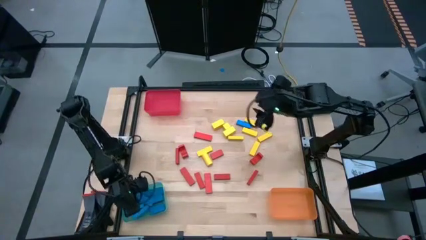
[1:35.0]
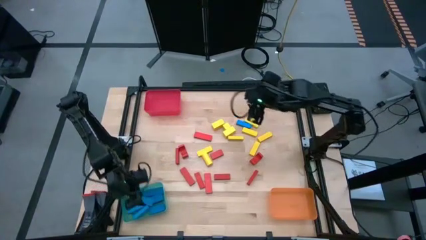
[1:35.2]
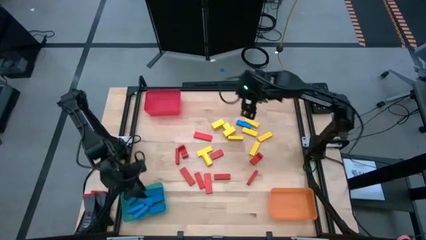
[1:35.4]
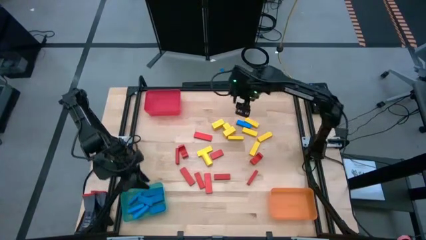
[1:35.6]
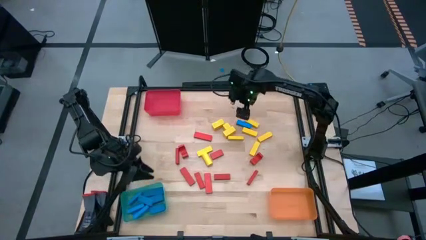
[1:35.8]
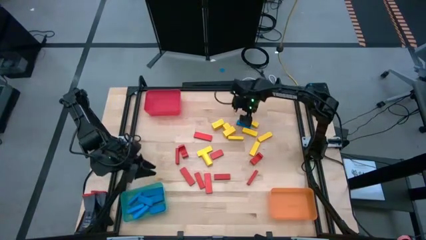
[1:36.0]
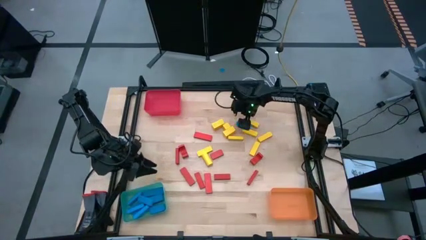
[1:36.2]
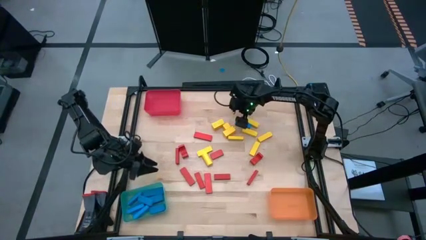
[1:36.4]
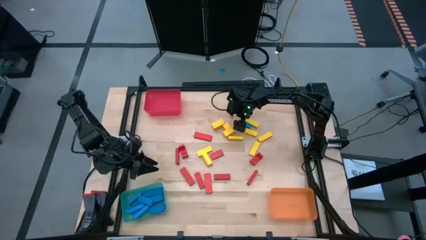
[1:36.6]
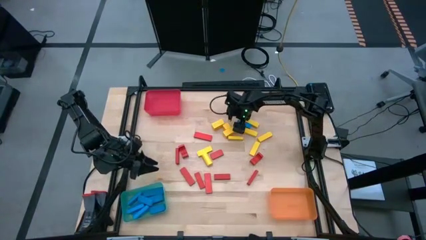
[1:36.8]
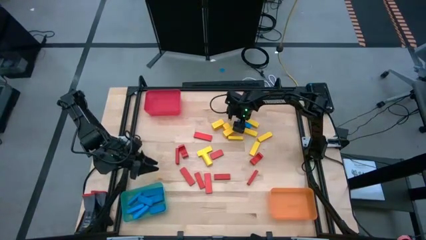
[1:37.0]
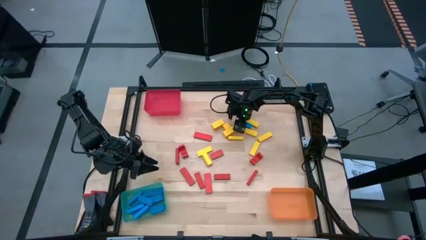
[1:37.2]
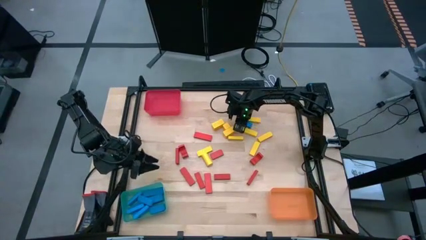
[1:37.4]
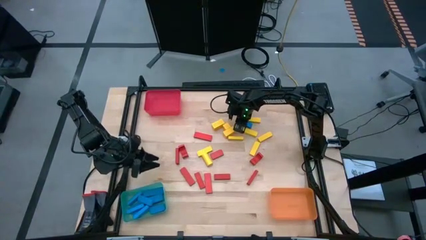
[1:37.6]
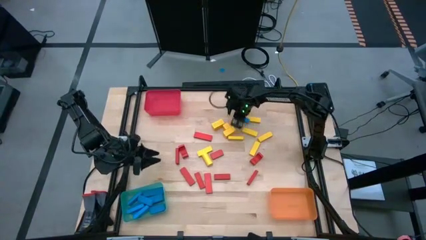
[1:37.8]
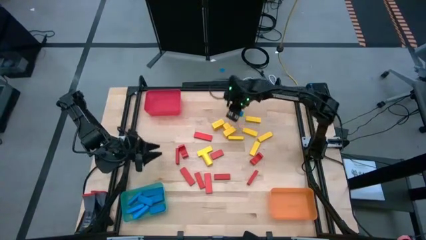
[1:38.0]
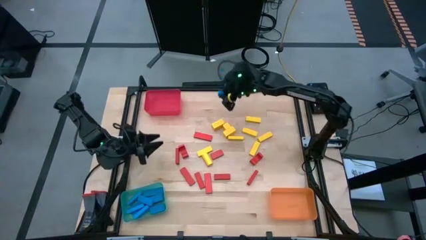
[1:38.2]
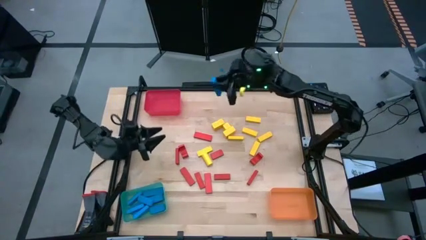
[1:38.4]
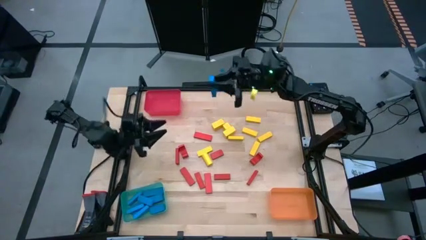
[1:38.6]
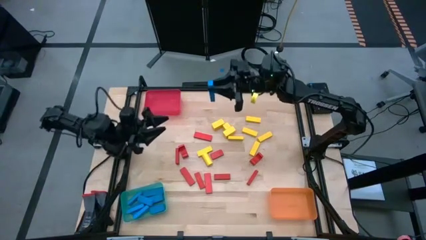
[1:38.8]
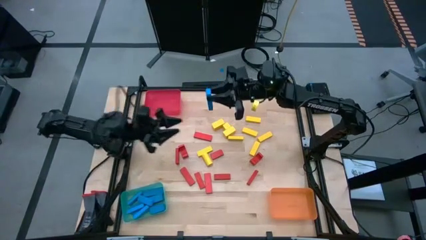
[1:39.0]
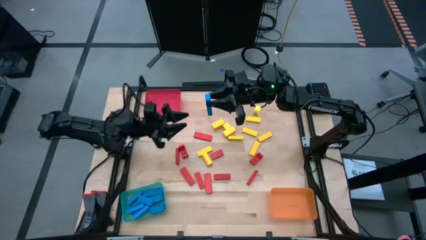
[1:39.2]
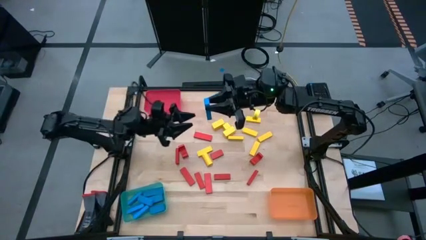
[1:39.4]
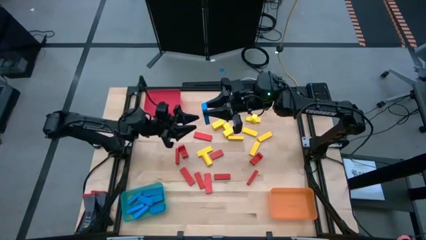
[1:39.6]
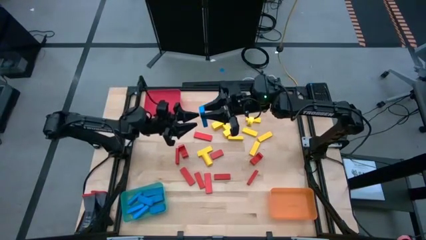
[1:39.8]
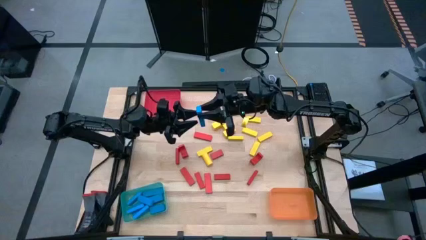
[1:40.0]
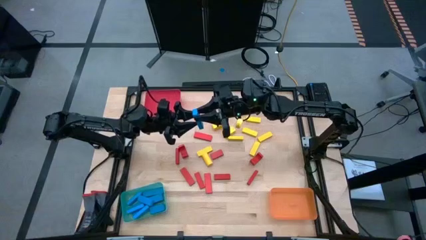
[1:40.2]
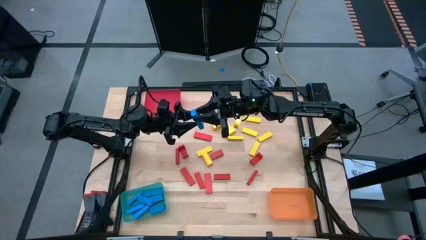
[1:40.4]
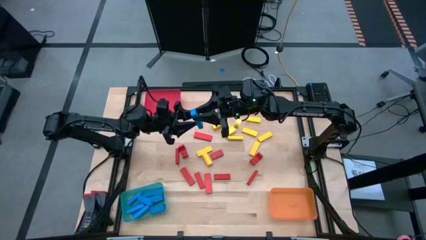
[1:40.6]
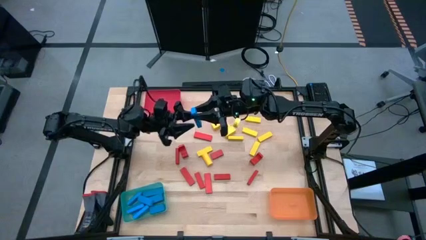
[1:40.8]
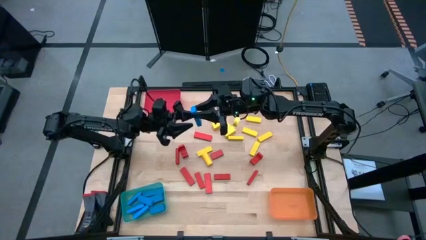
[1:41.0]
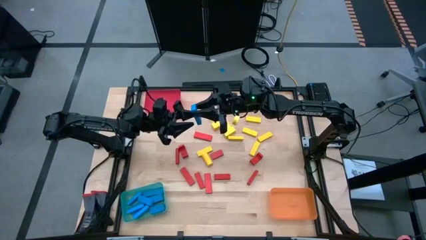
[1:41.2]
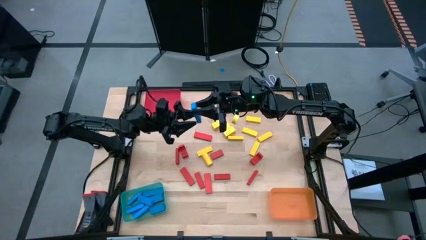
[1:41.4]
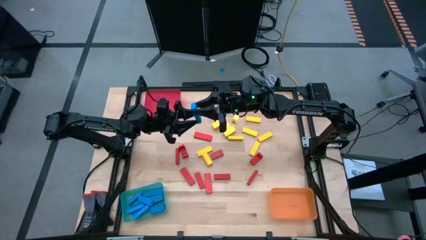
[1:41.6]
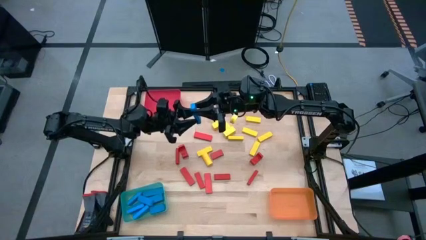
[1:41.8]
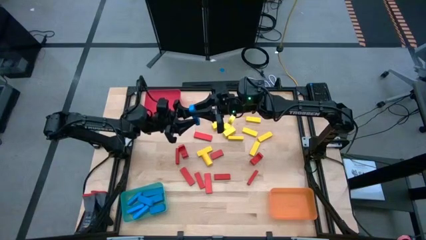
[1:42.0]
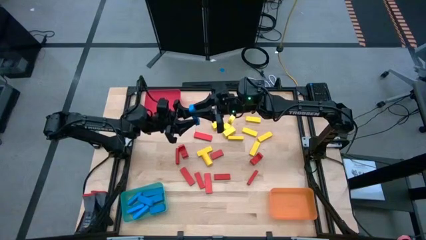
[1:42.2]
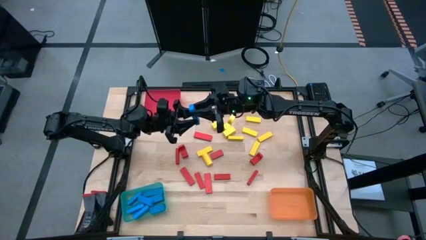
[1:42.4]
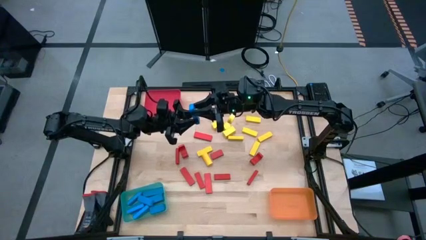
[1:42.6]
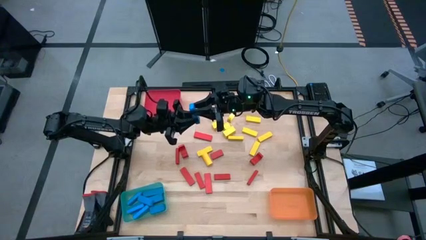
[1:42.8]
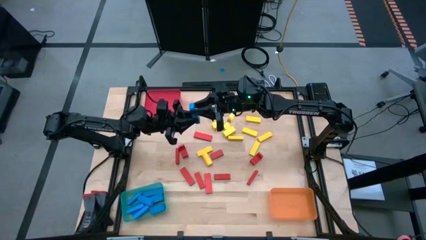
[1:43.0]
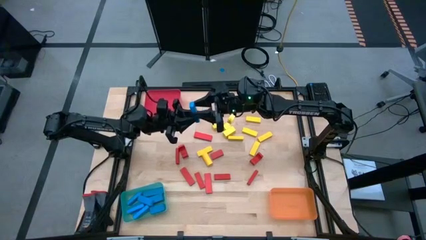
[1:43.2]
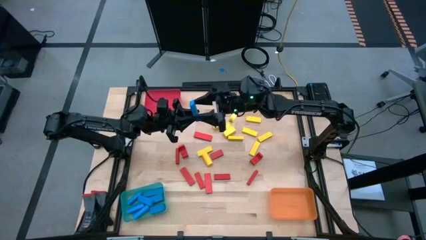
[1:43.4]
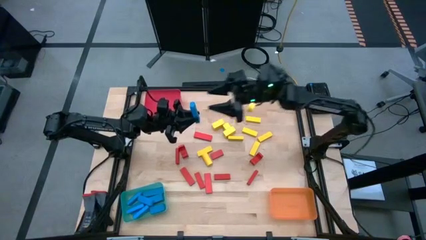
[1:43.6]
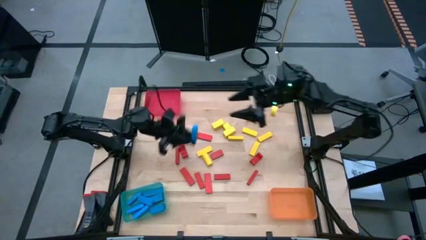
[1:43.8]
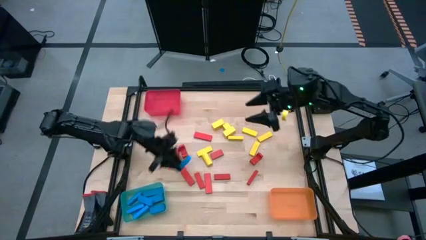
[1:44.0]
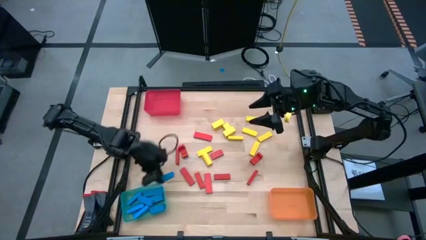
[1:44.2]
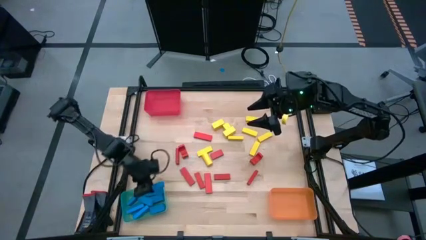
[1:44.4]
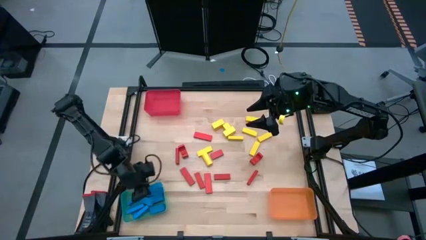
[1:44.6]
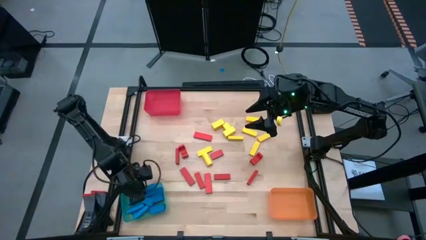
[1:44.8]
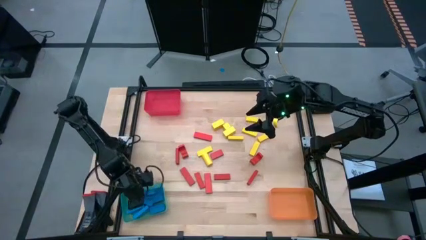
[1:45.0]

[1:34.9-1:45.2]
Task: Sort blocks
Put the blue block into the green bin

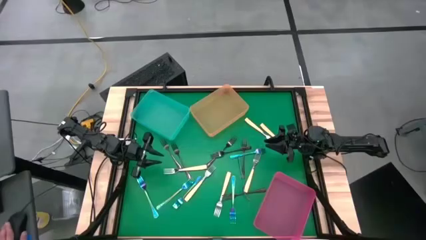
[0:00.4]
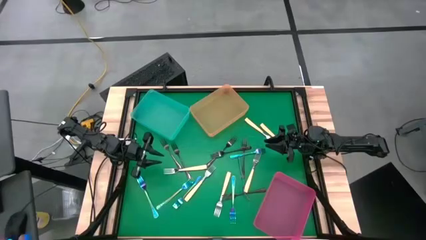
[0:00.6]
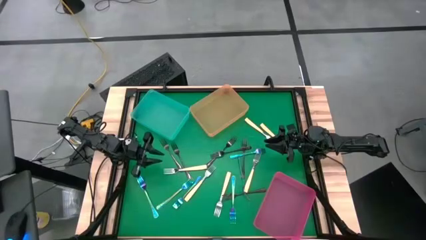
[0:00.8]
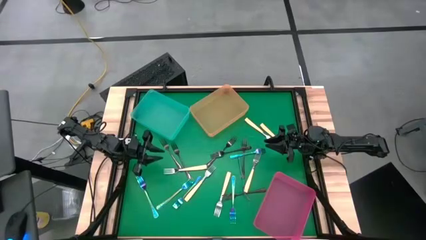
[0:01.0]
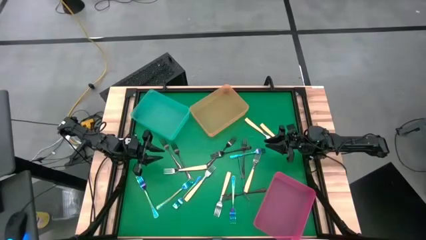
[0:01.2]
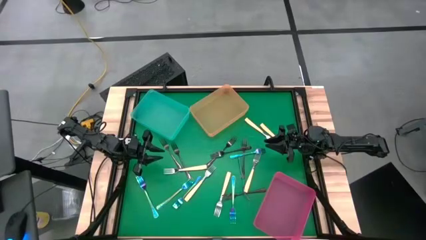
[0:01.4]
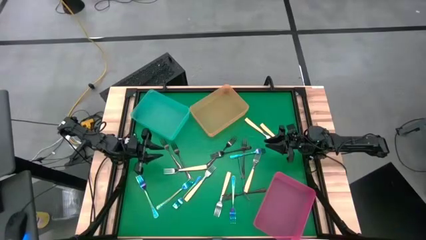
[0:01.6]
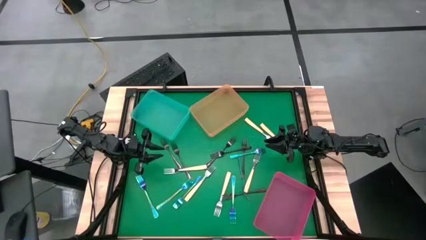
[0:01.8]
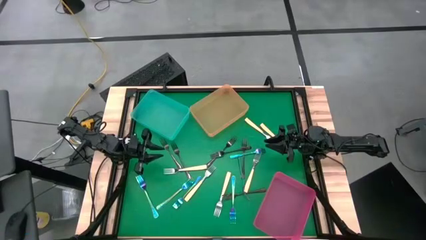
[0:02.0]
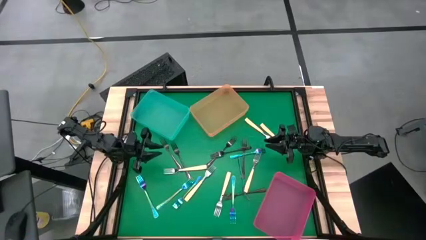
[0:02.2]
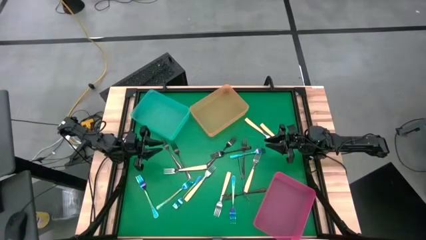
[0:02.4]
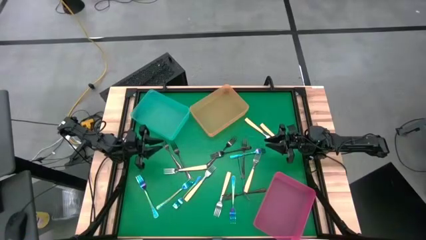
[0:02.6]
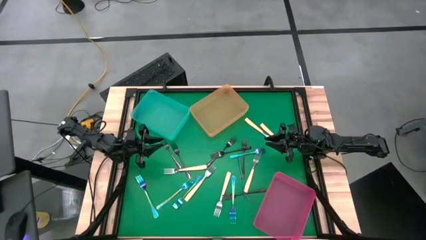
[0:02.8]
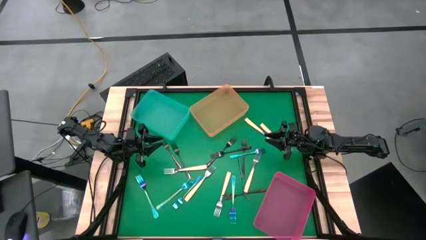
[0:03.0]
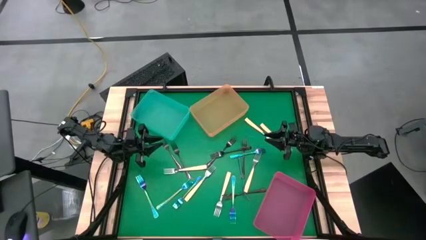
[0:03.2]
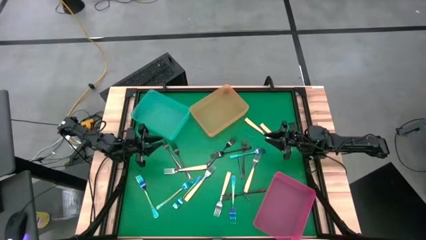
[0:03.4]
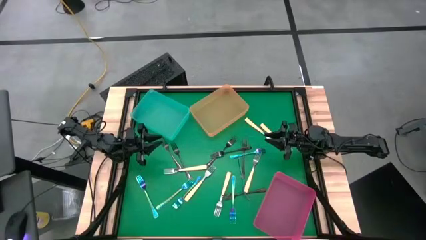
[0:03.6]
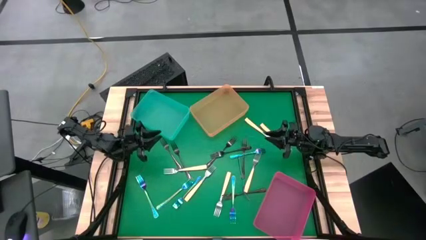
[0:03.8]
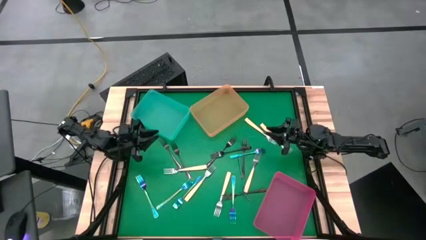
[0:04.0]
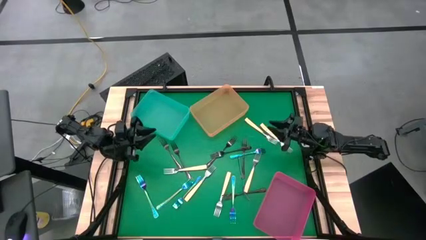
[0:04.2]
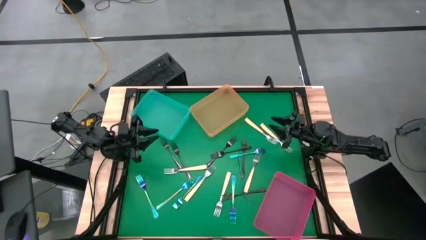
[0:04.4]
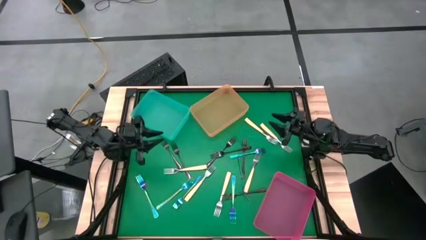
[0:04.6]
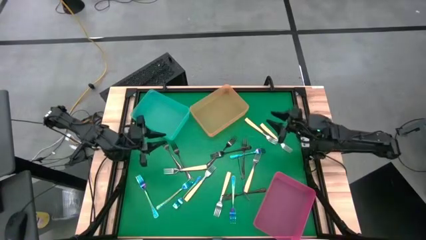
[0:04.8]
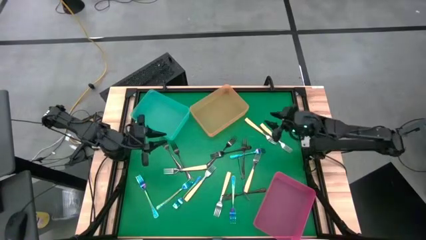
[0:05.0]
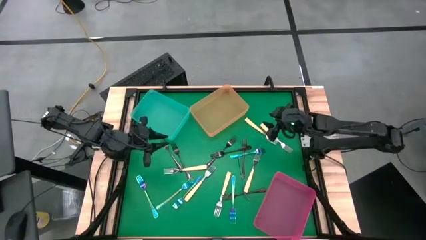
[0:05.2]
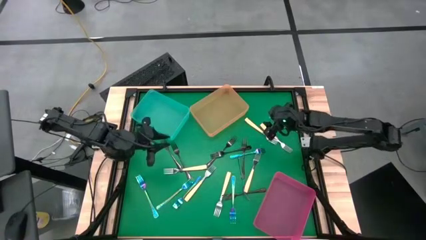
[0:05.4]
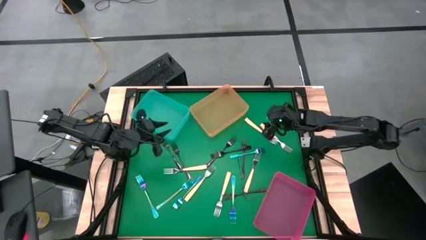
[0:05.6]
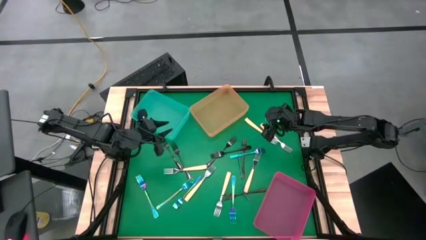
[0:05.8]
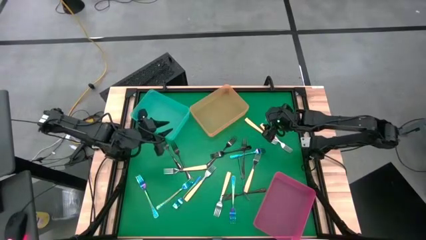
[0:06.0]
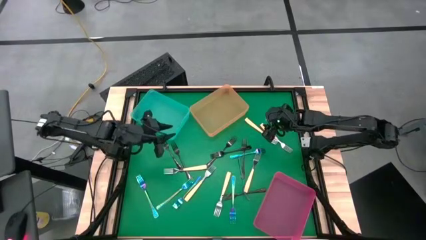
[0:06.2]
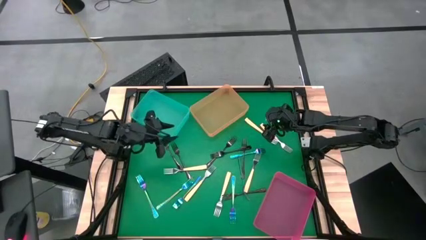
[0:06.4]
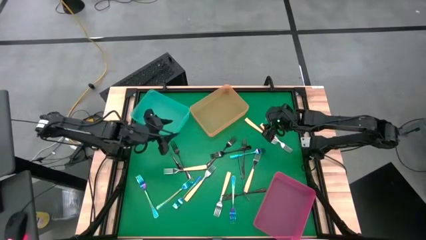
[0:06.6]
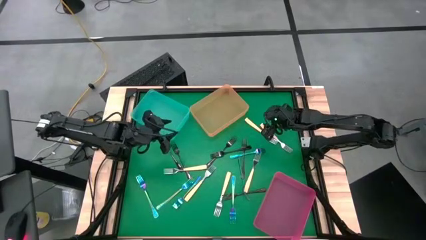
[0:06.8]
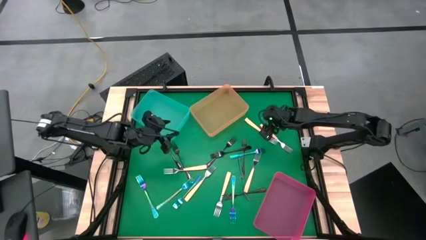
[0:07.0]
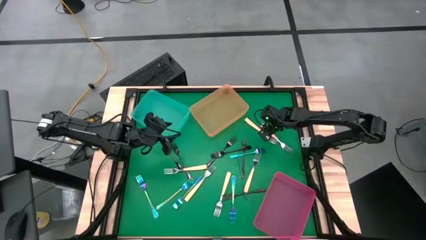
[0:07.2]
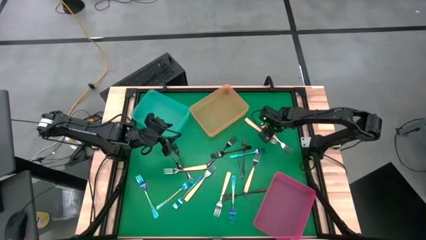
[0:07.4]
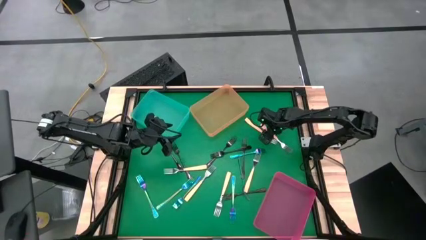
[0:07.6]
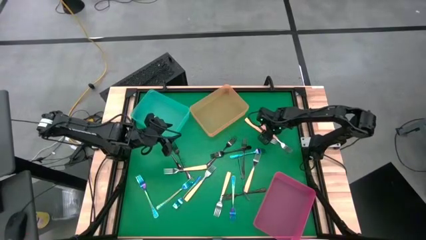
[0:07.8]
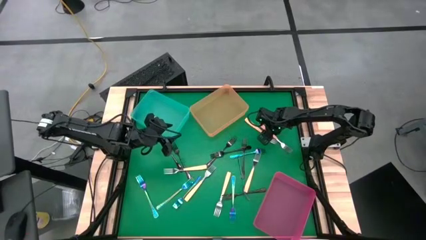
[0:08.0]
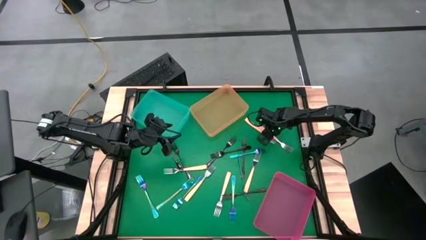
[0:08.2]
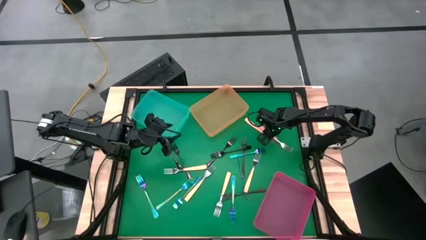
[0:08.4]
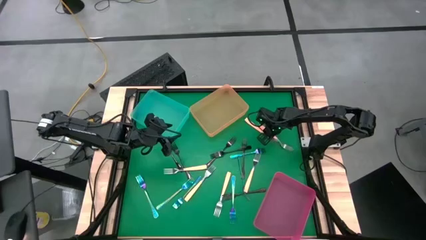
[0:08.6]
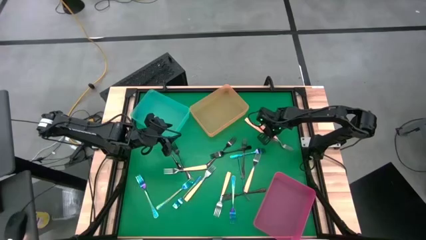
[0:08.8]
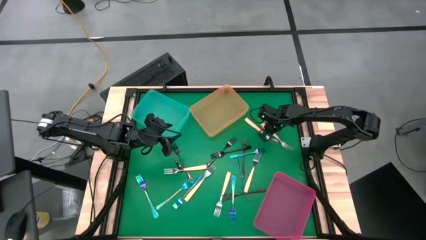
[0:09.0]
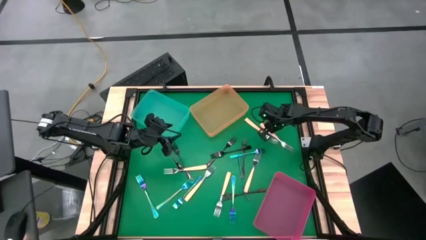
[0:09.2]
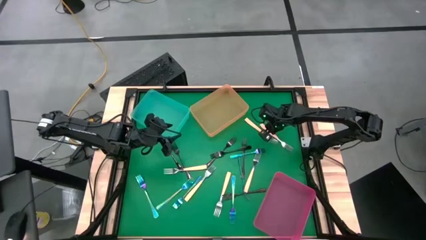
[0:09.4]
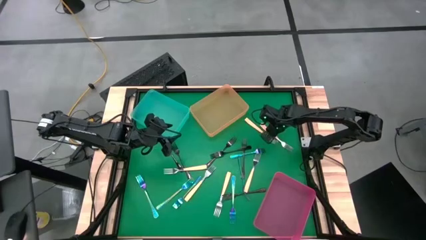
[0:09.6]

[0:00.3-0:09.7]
Task: Sort silverware by color (type)
Put the yellow fork into the pink bin
